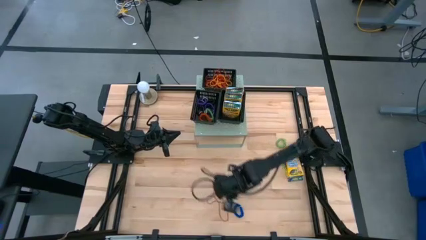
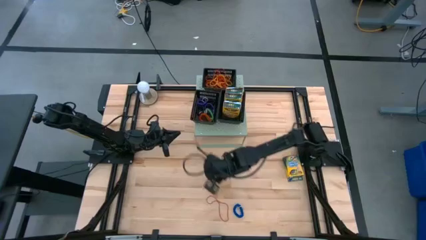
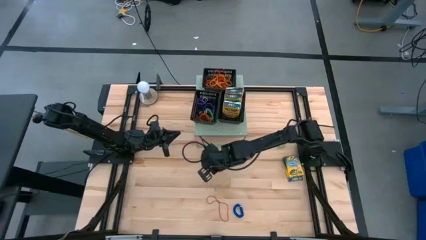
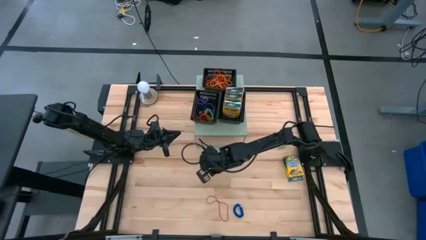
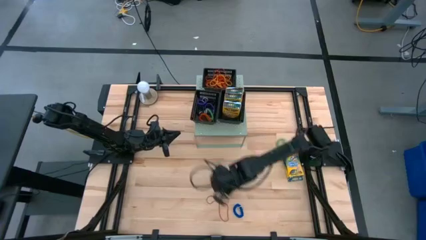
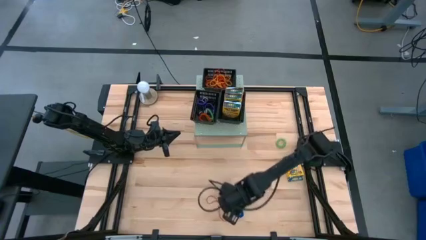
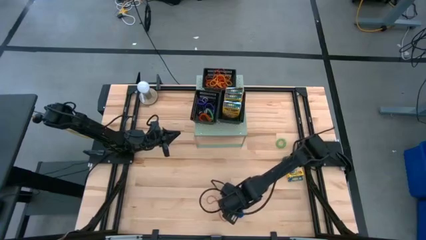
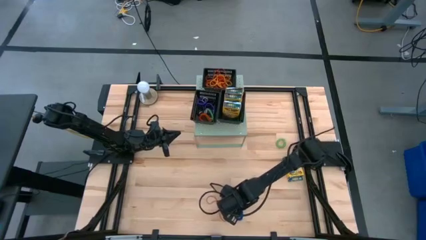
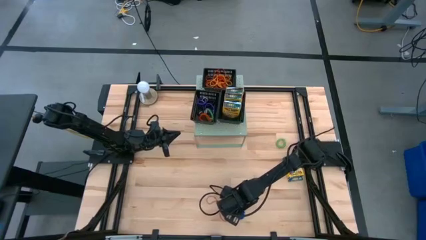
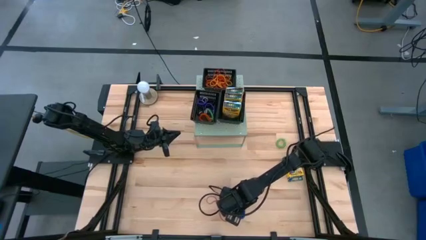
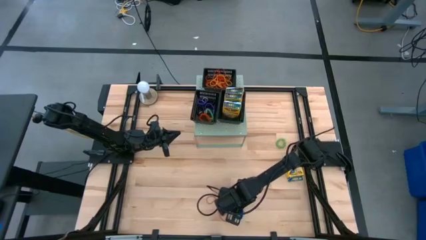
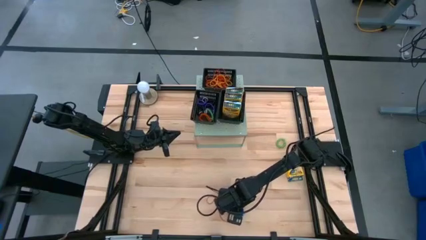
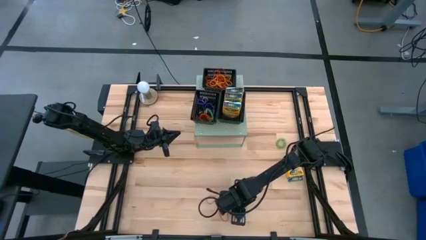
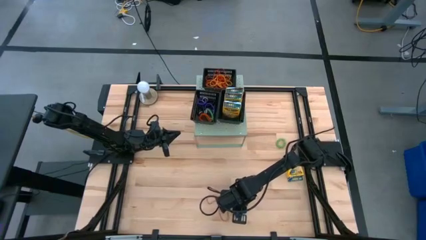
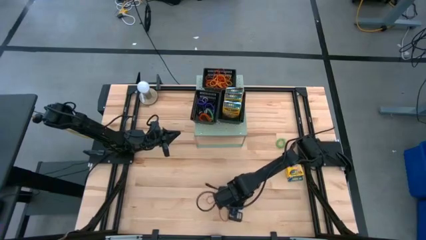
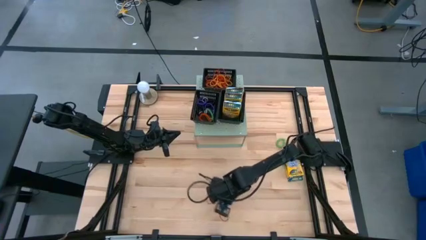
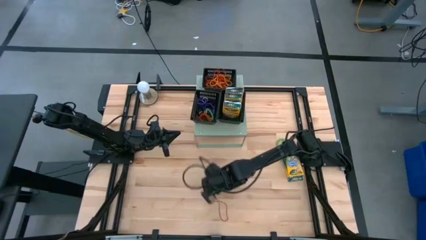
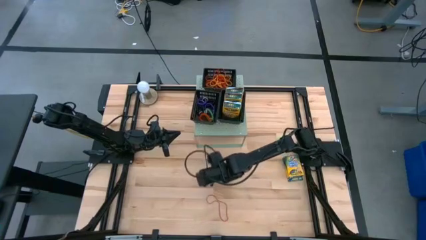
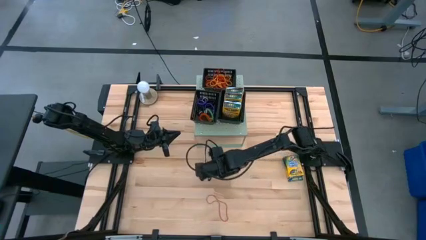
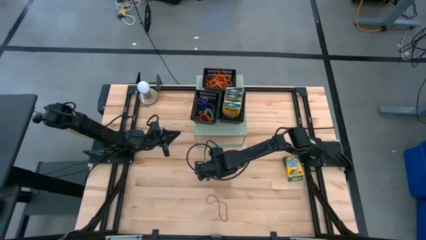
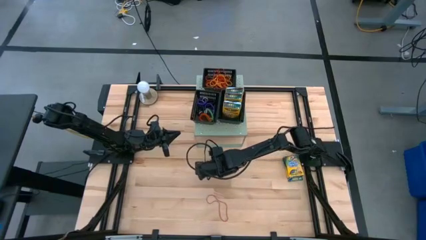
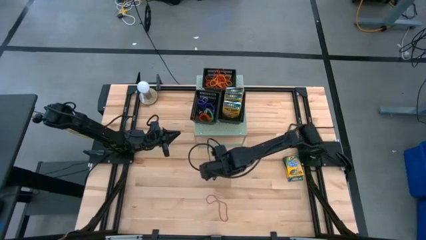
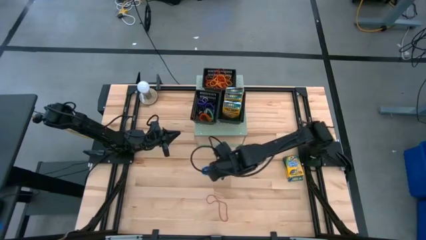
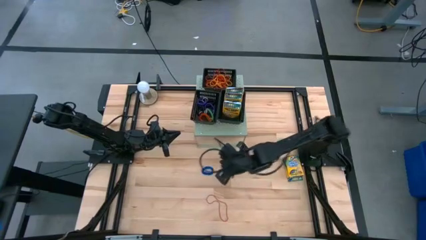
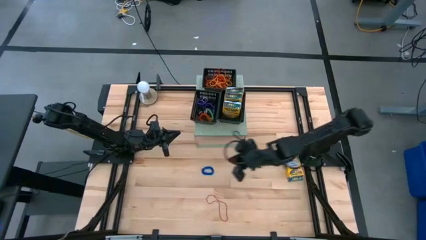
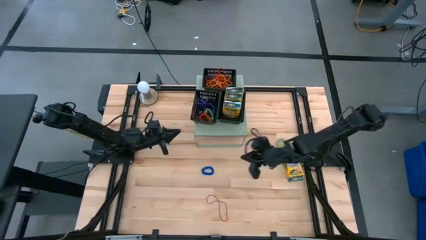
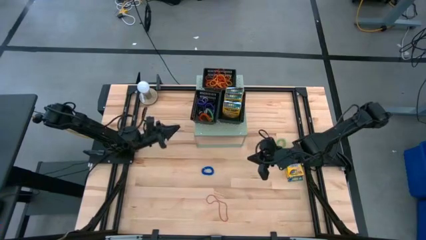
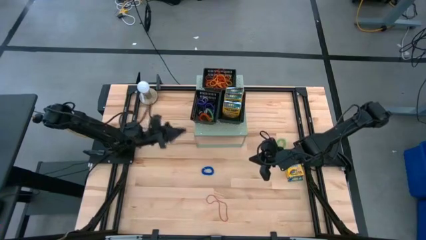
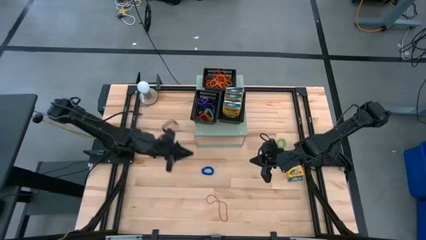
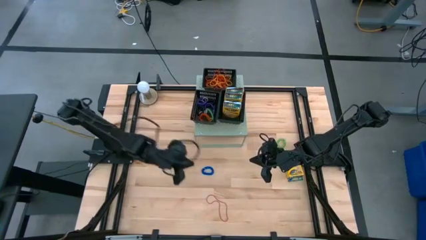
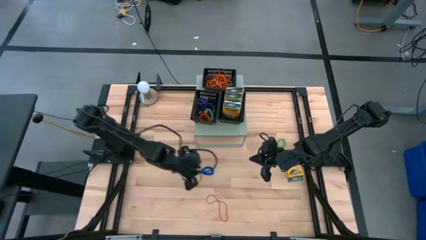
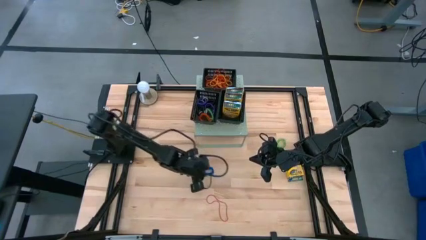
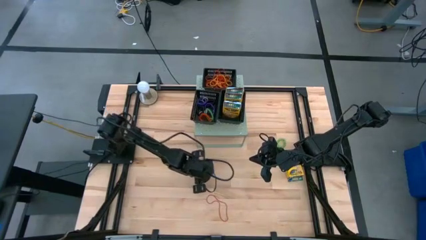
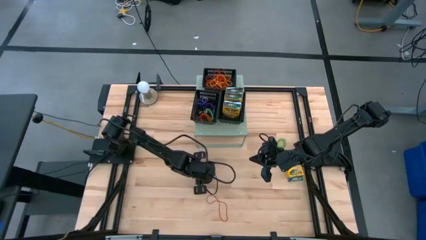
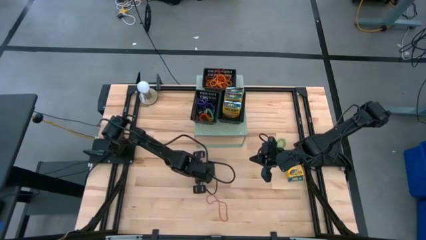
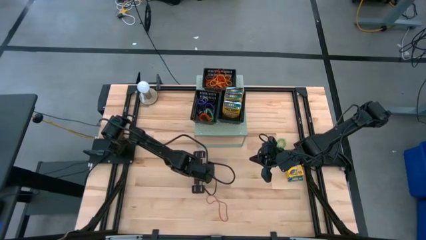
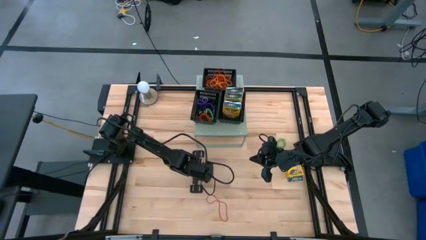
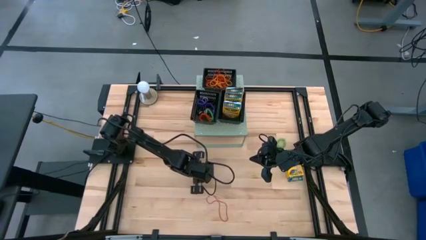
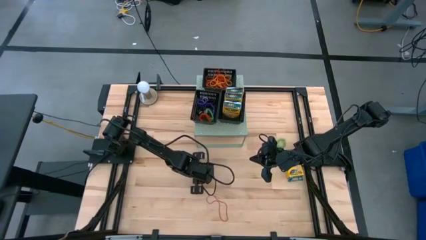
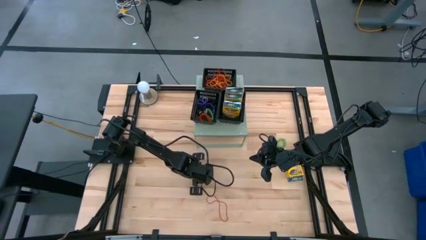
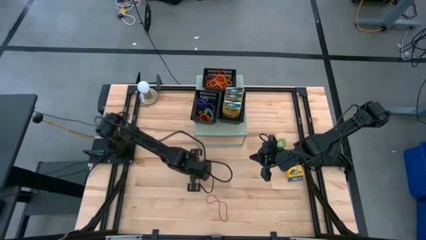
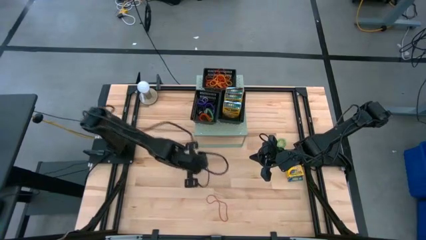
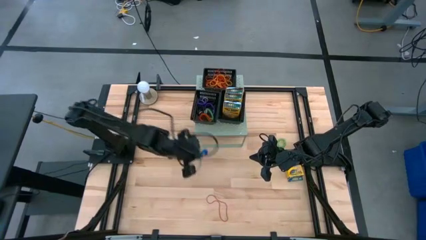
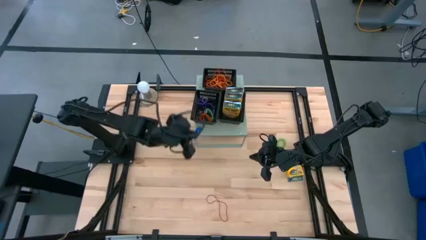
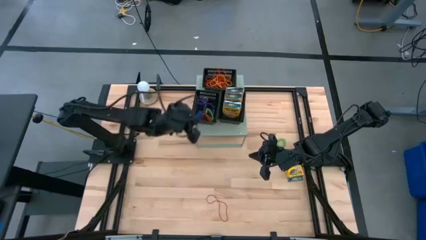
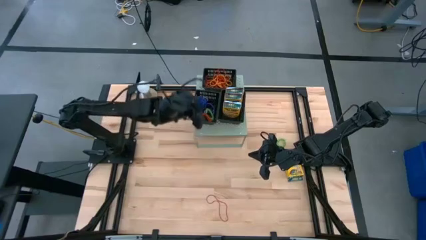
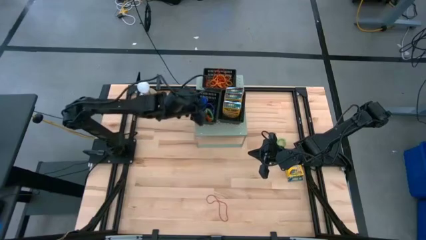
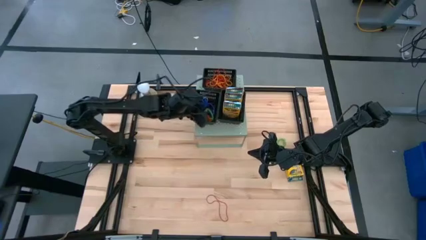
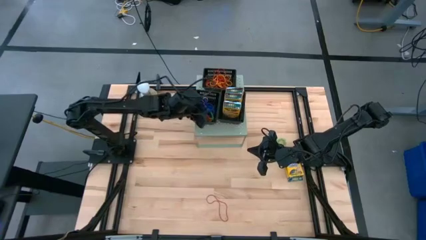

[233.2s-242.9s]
Task: Pick & Place Office Desk Supplies
Put the blue spiral keychain into the bottom left black bin

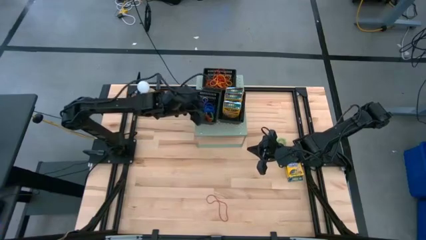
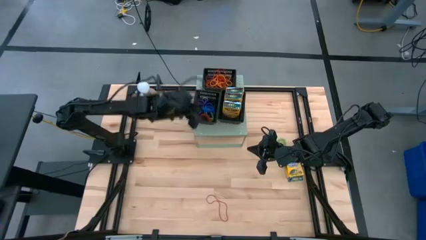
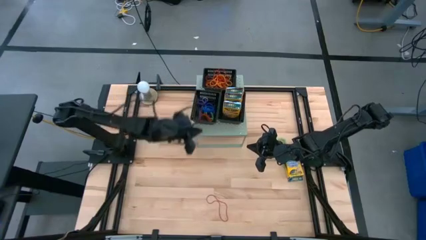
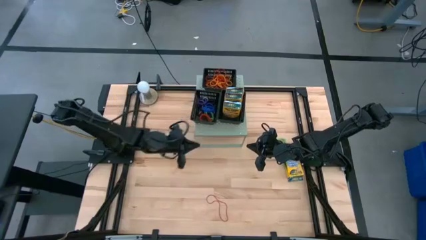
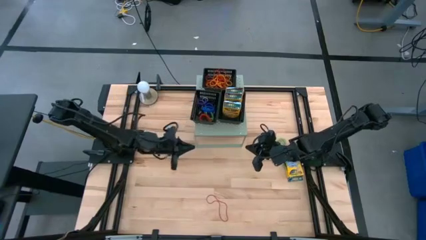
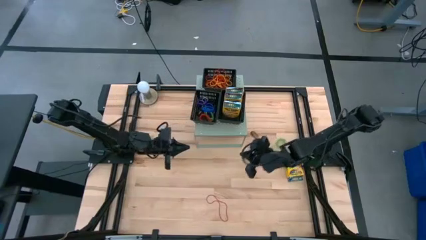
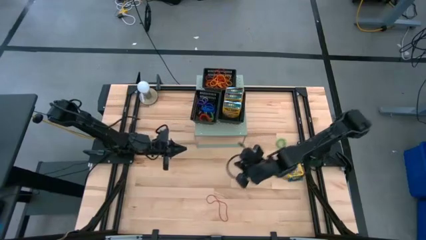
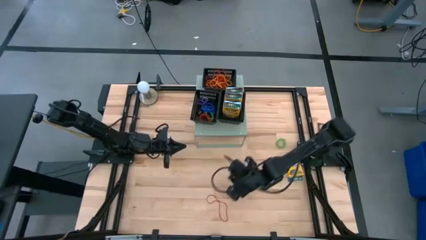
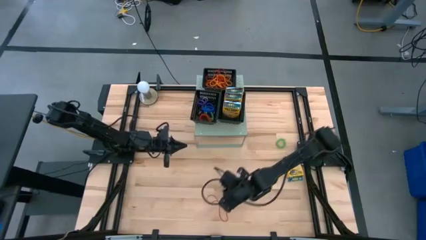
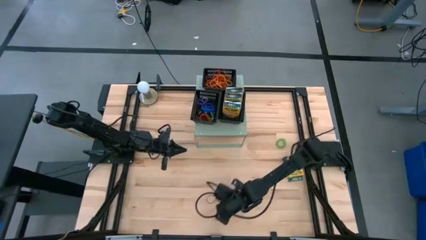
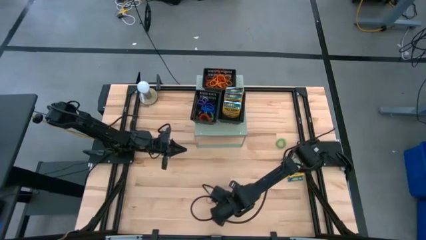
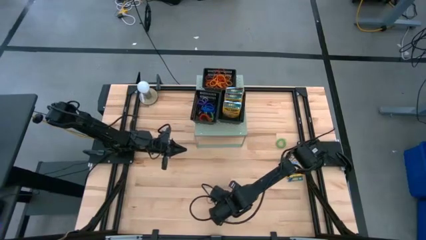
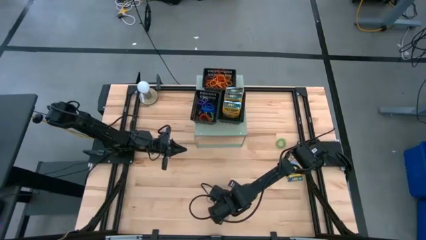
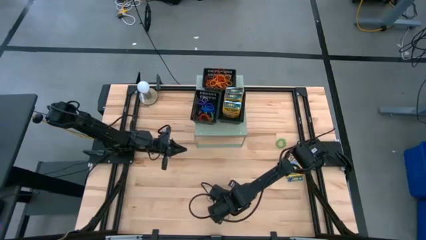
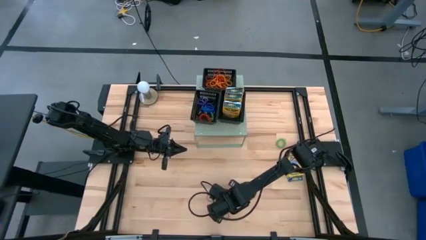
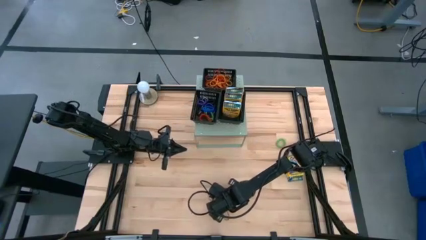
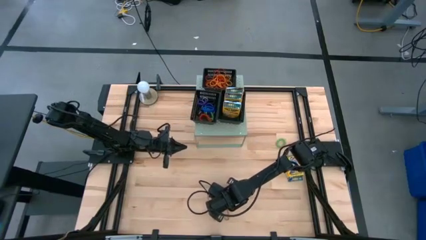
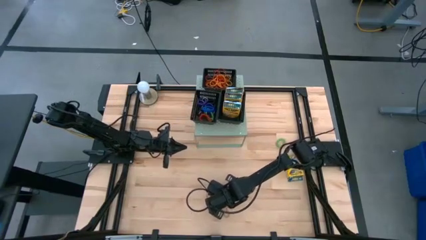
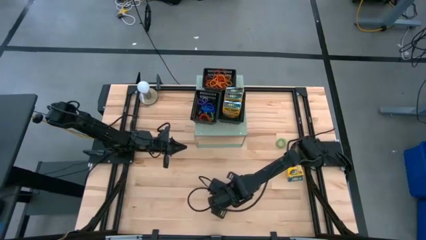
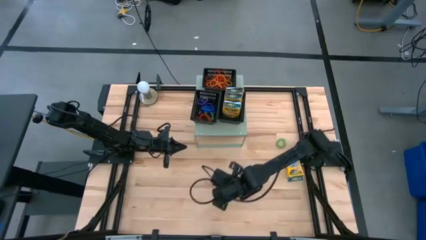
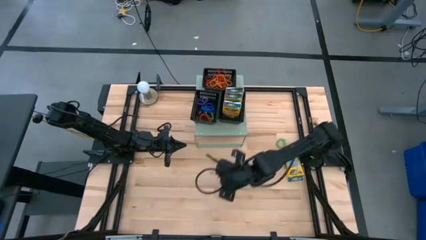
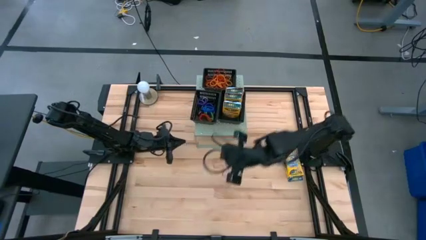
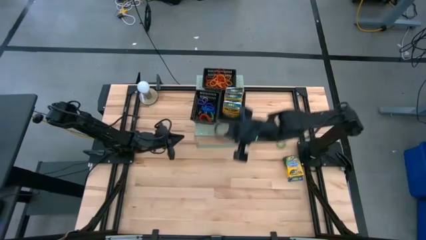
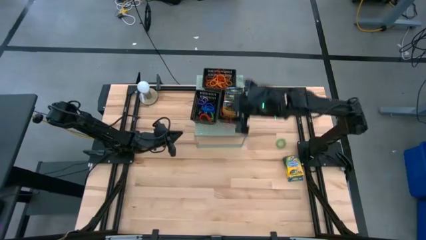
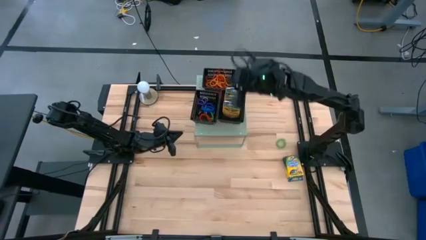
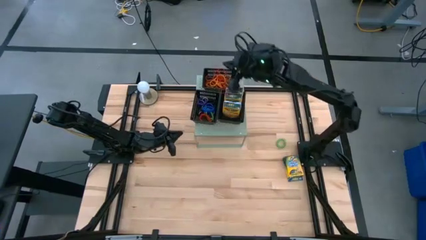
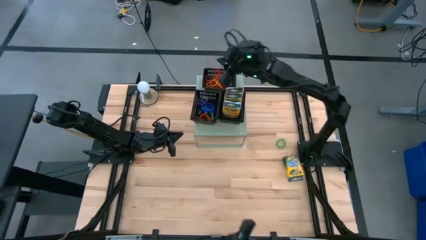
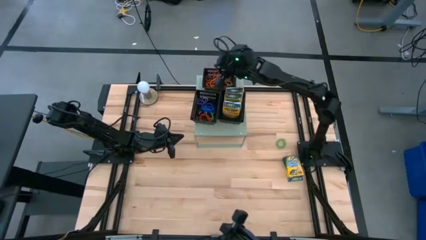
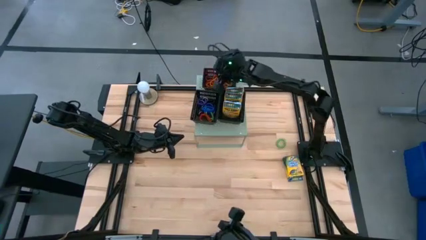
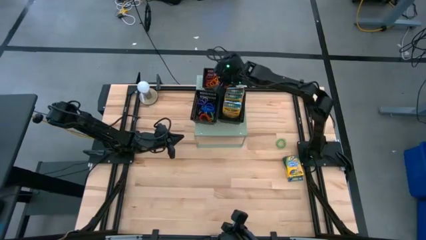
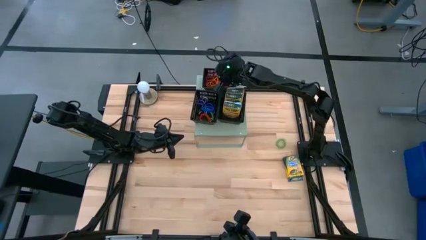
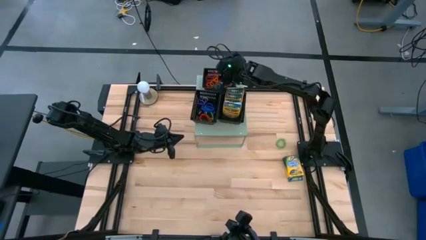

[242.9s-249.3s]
Put the red rubber band into the top black bin

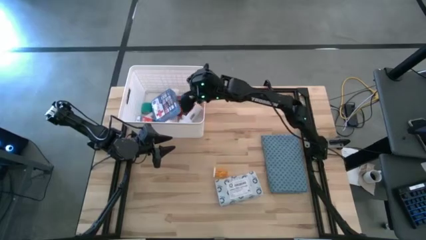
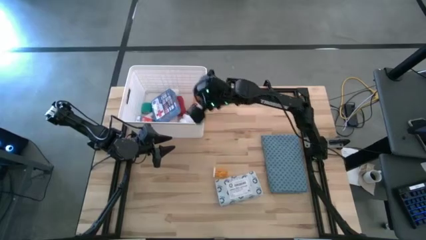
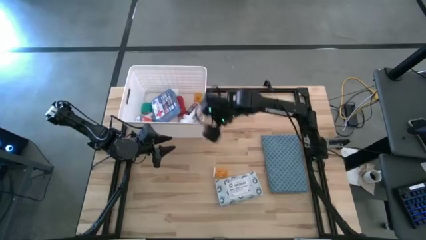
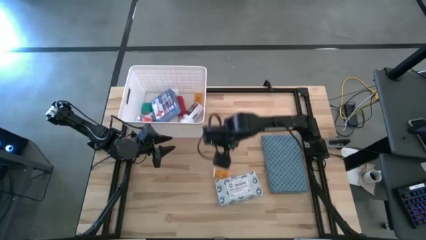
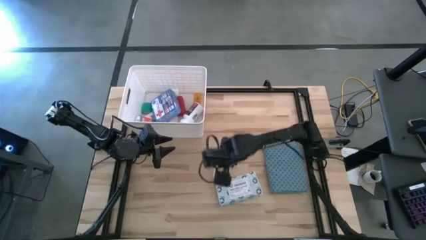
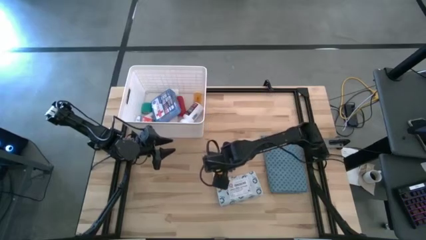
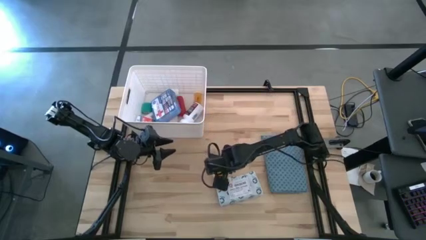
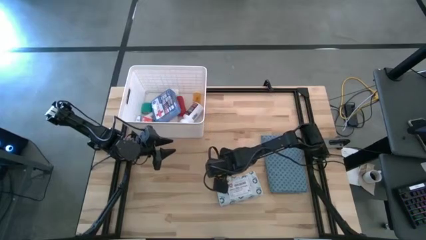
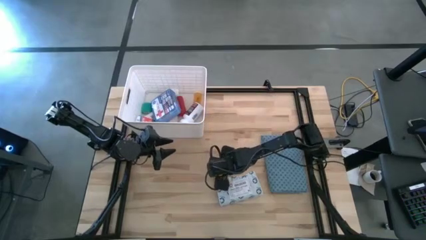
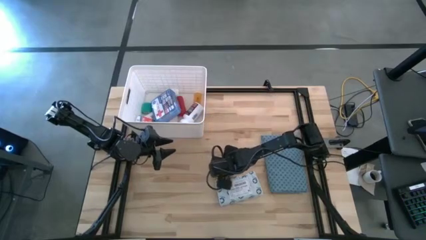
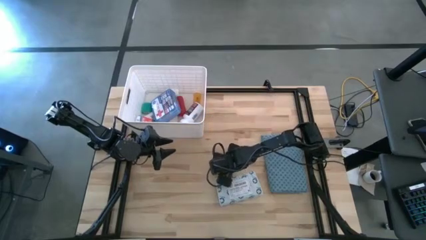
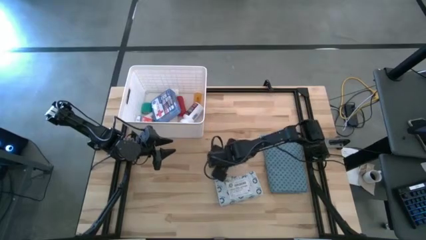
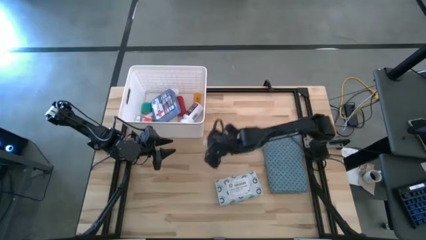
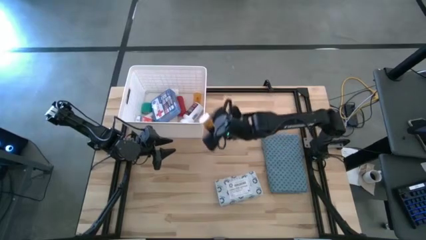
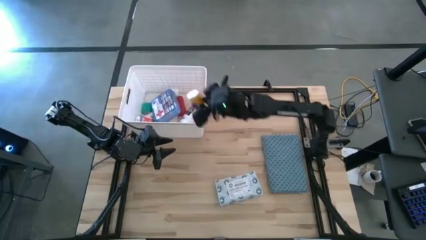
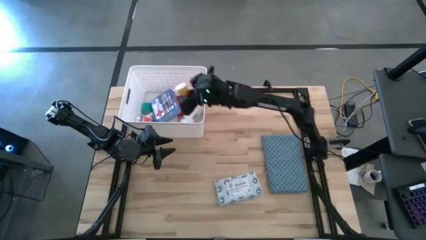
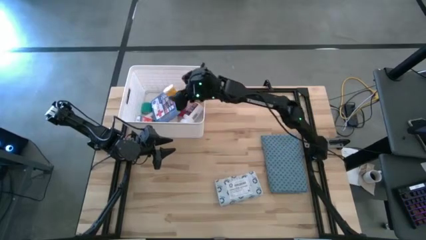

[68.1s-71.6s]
Task: Pick & place medical supplies in basket/bin
Put the orange capsule bottle into the white bin
